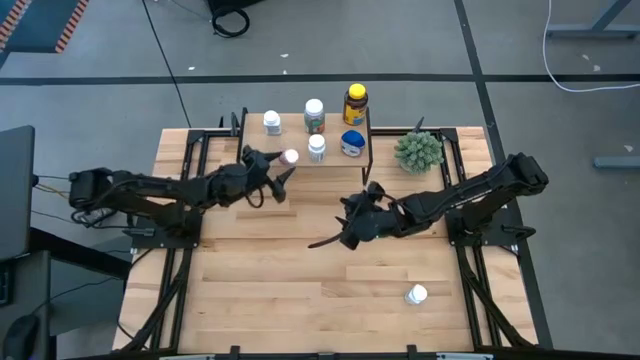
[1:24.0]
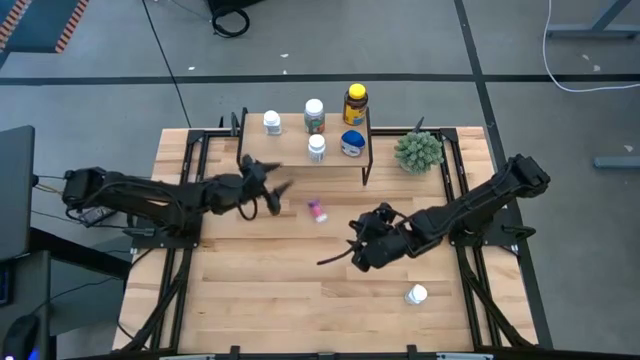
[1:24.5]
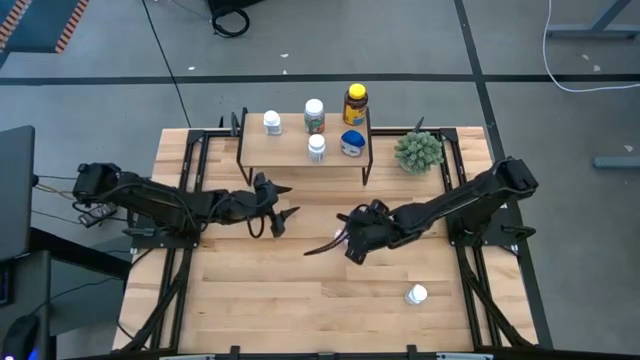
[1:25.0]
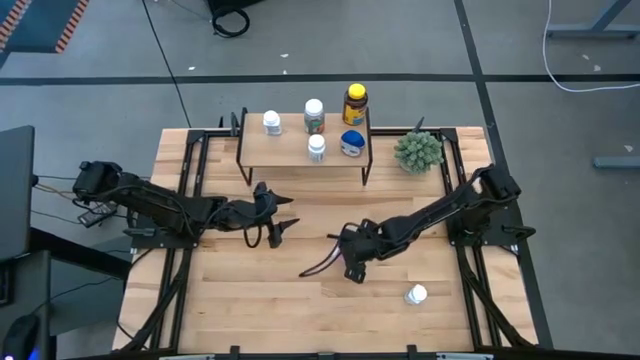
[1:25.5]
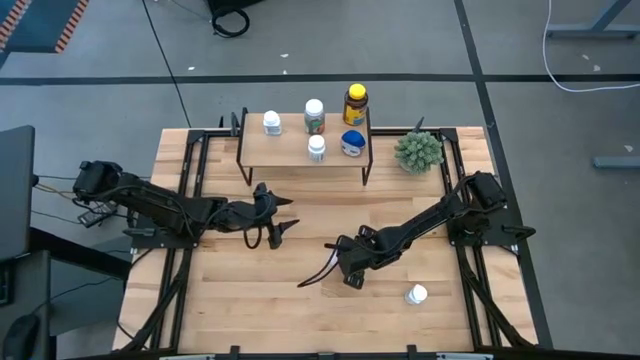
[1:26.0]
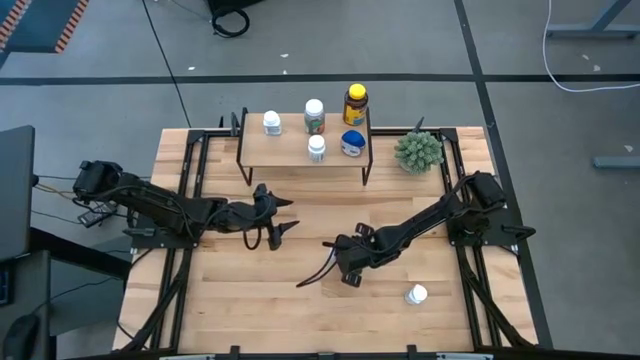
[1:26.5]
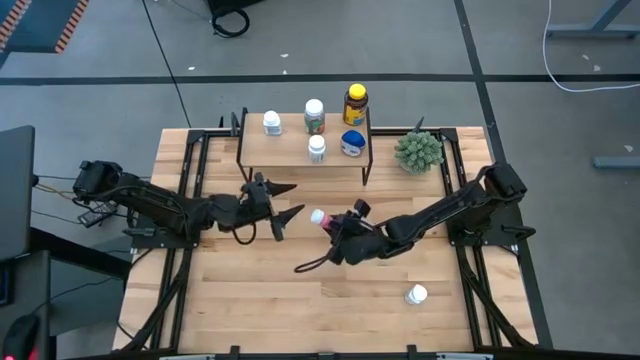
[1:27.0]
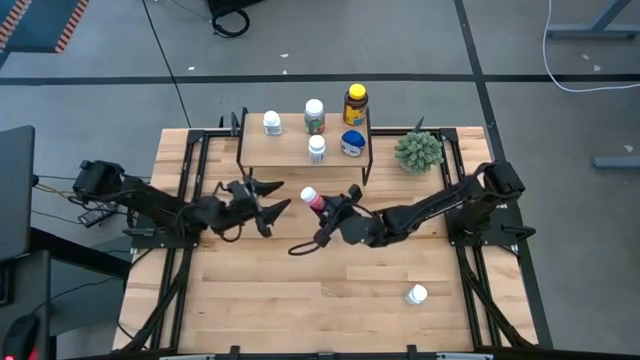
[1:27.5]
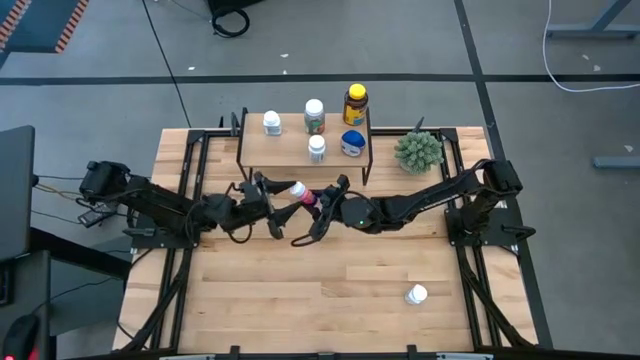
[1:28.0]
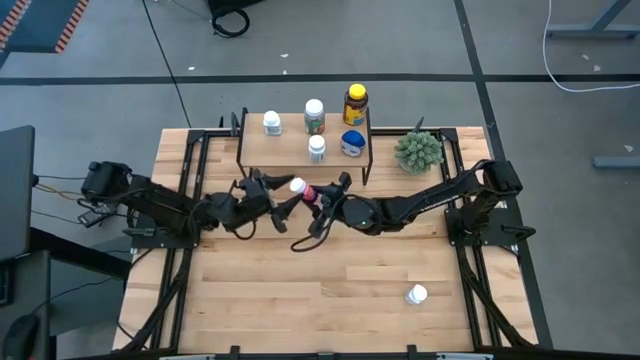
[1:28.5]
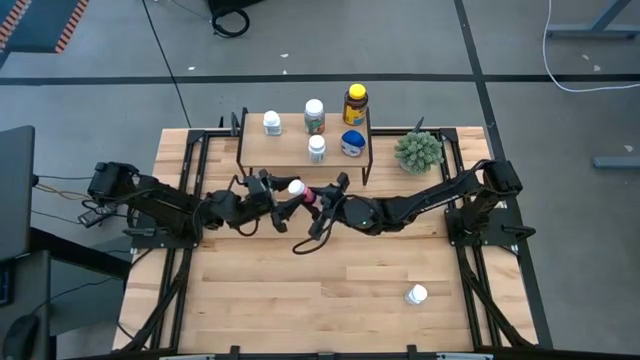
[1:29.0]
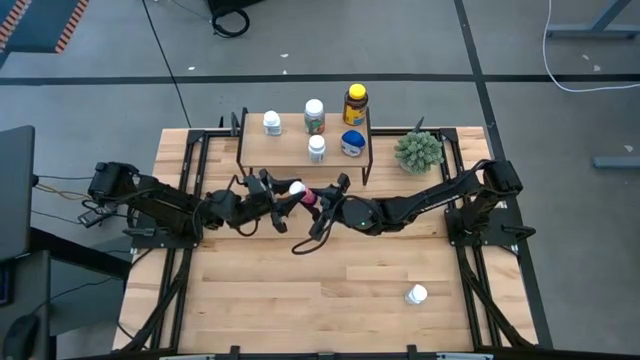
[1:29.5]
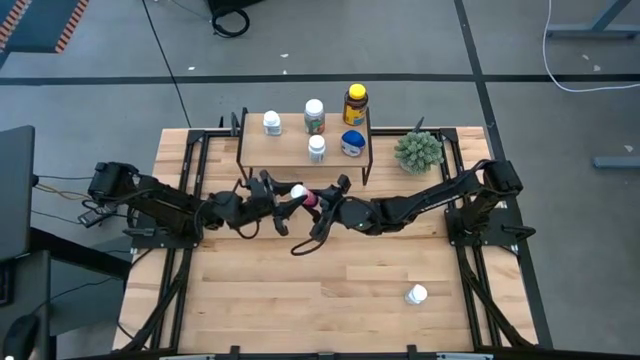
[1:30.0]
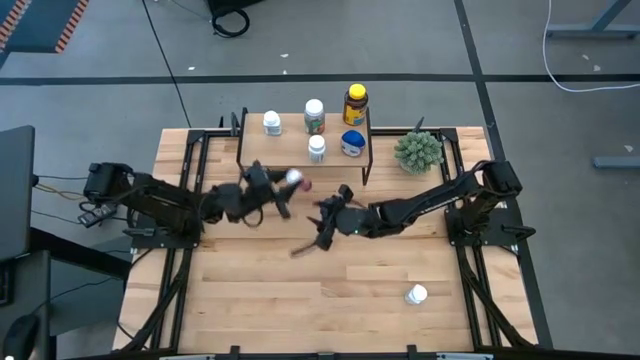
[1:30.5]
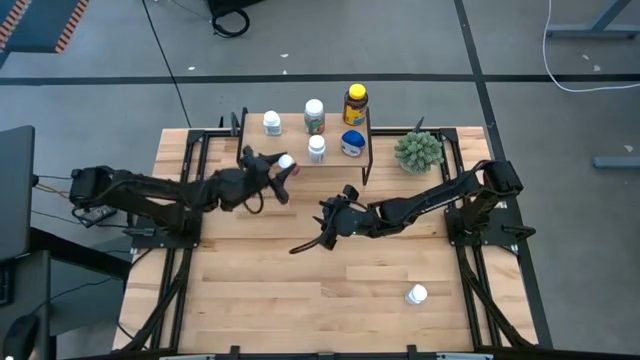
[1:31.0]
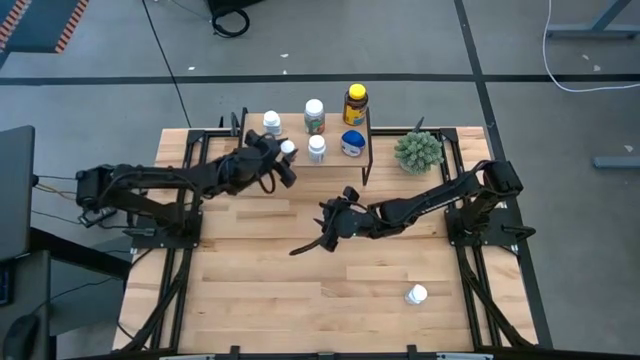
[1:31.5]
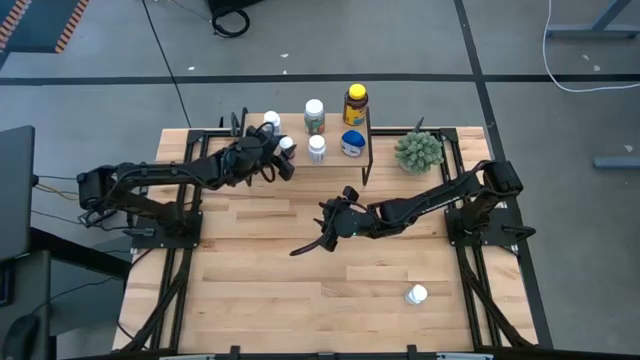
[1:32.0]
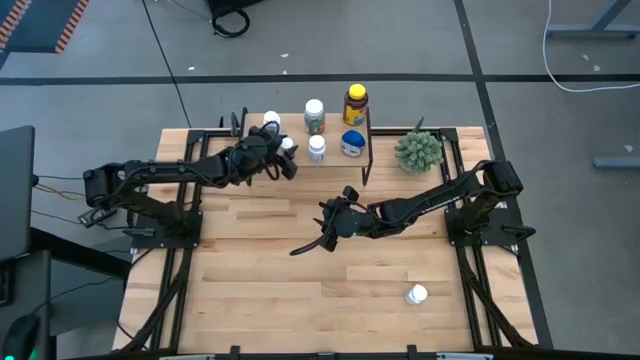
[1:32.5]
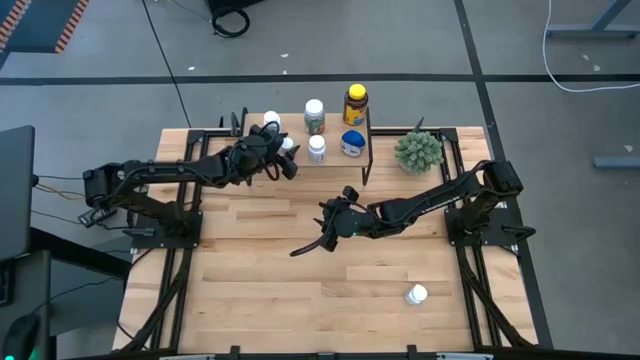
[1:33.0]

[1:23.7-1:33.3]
Task: Pick and place medicine bottles onto shelf by color
Put the pink pill bottle on the shelf

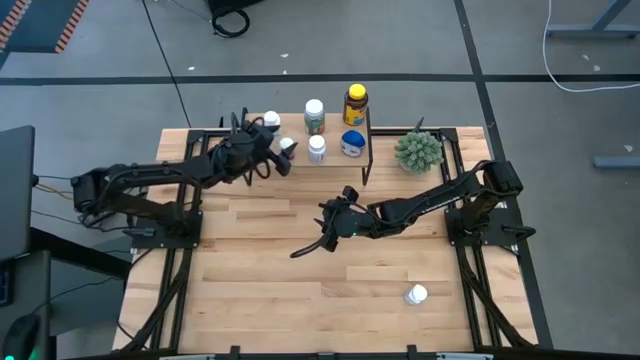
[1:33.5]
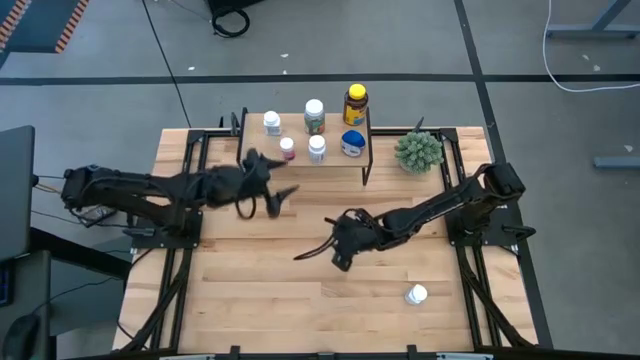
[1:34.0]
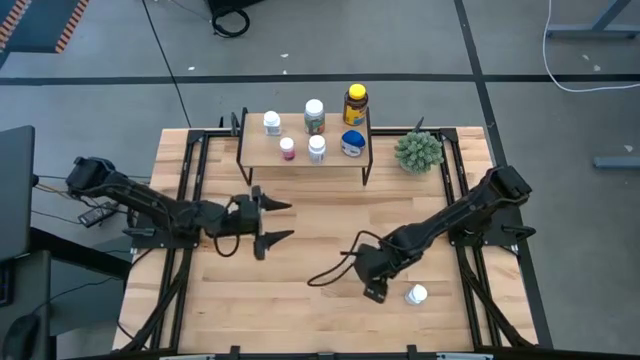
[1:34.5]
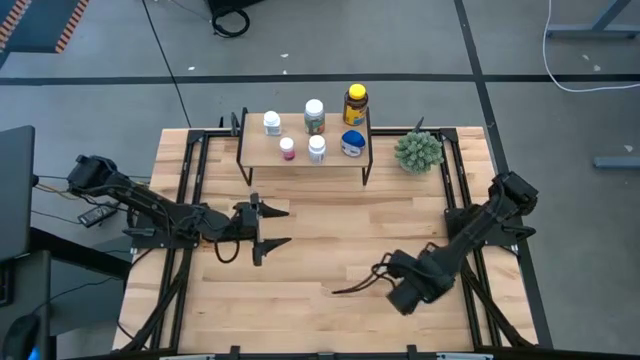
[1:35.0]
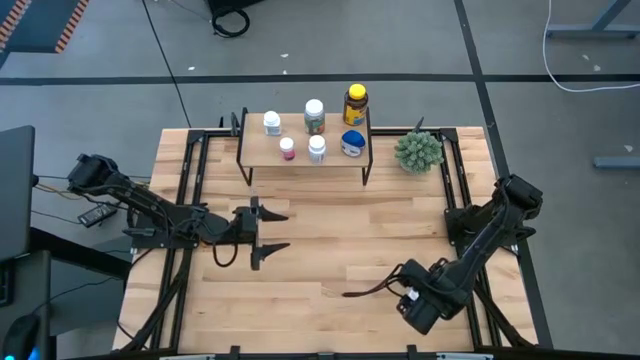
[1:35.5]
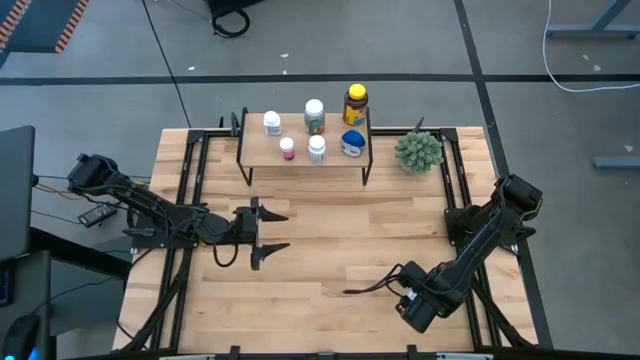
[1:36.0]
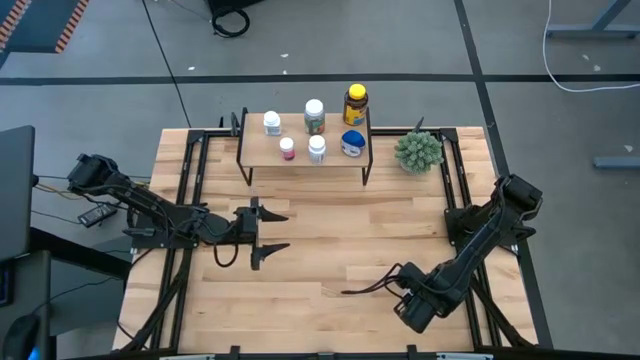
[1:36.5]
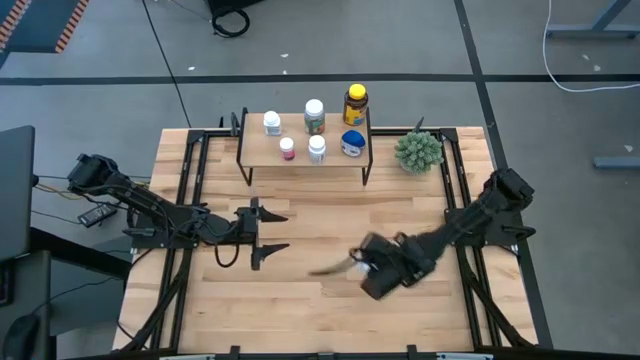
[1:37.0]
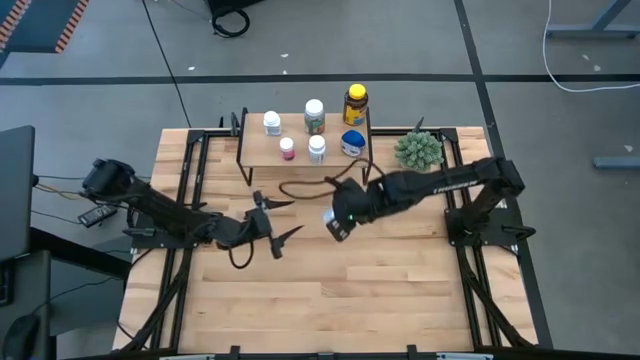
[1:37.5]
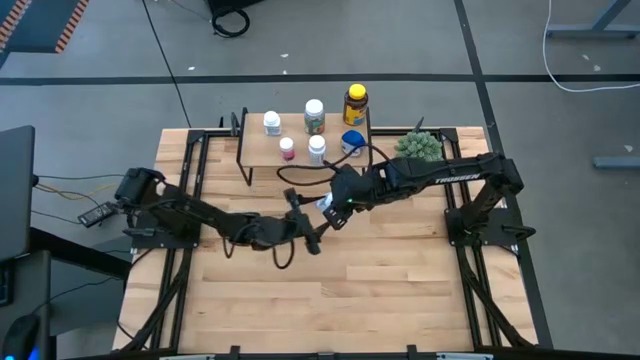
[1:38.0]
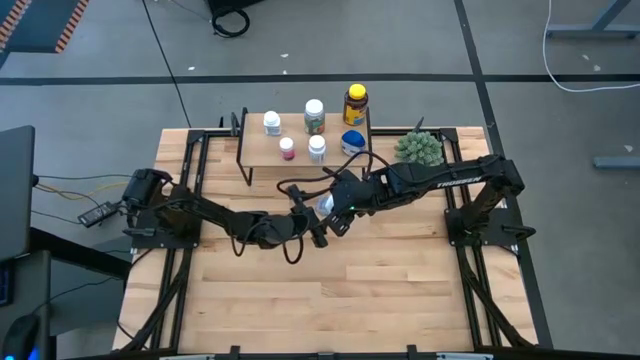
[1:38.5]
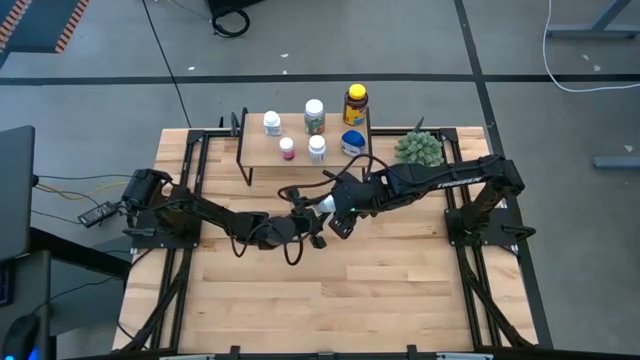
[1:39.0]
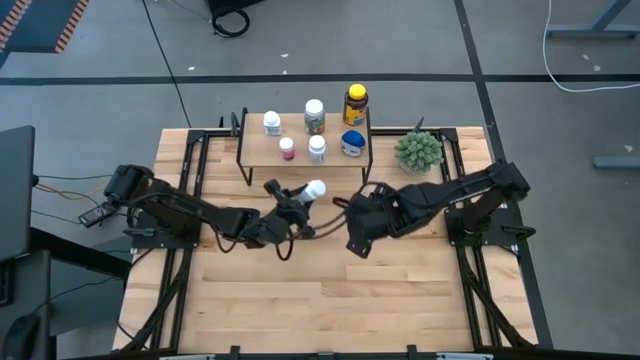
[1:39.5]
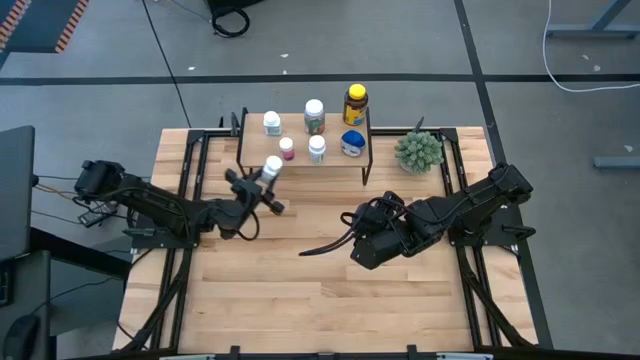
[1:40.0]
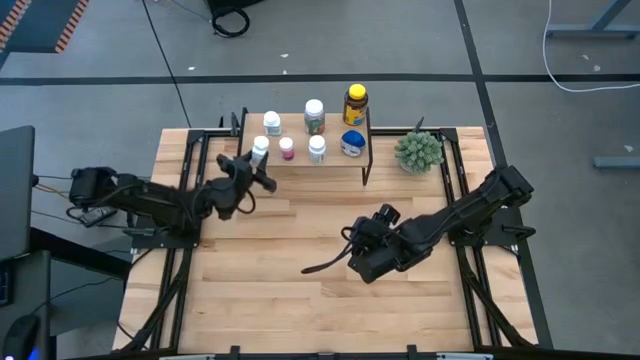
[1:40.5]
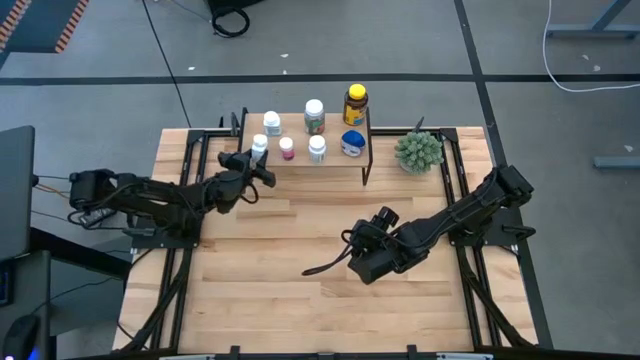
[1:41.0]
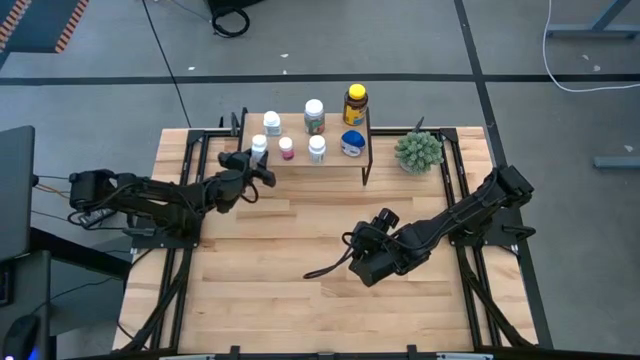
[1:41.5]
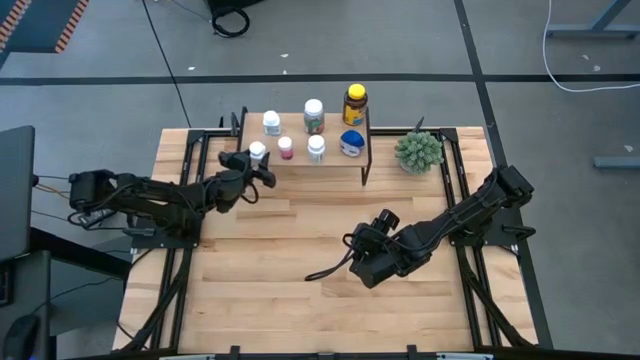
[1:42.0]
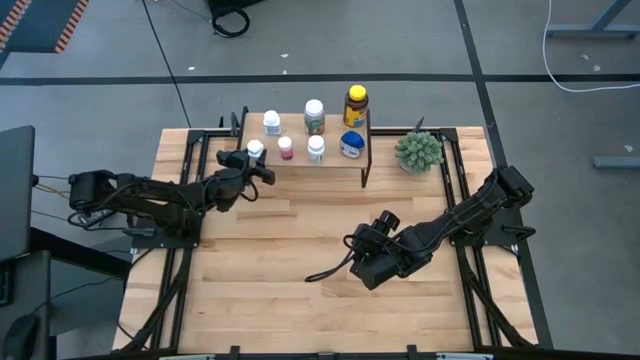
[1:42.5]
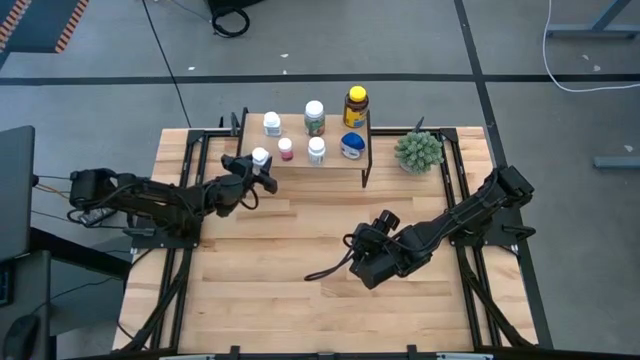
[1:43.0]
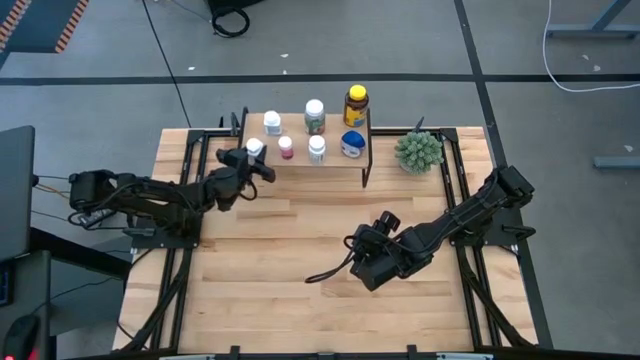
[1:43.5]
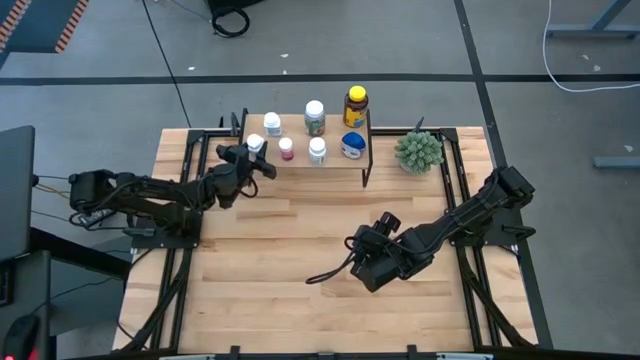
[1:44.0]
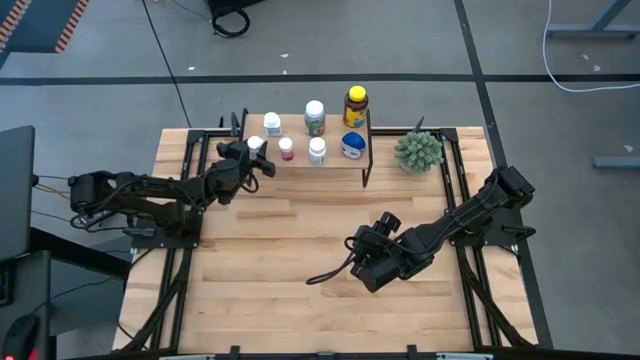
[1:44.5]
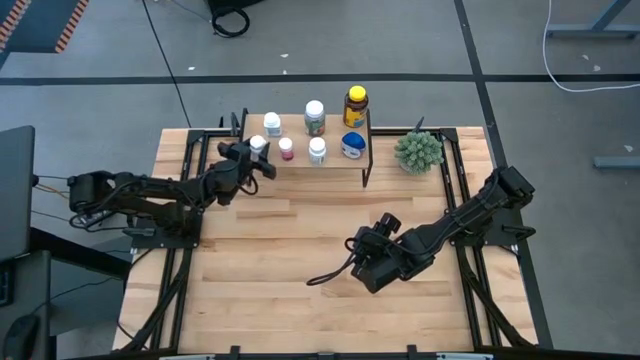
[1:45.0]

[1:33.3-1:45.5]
Put the white pill bottle on the shelf

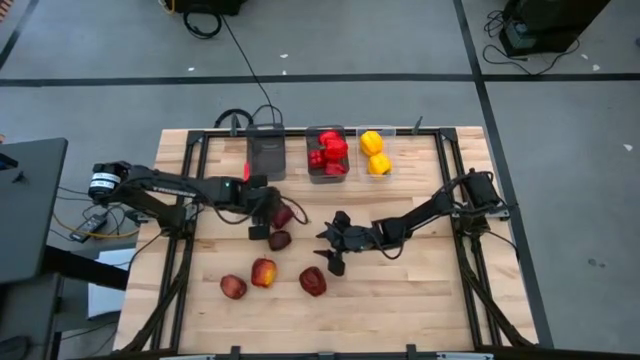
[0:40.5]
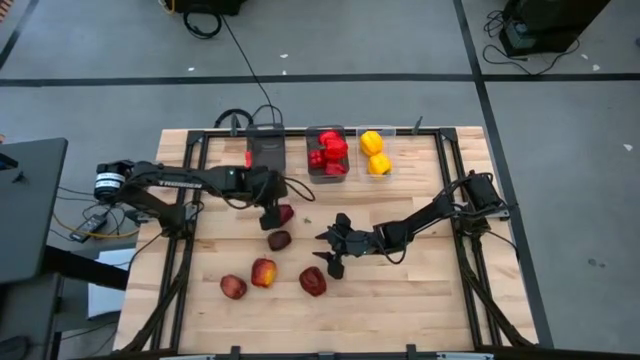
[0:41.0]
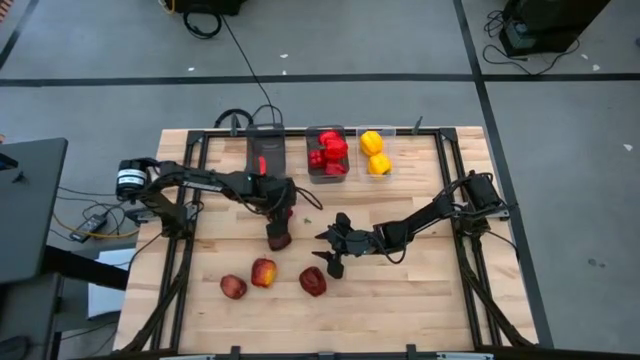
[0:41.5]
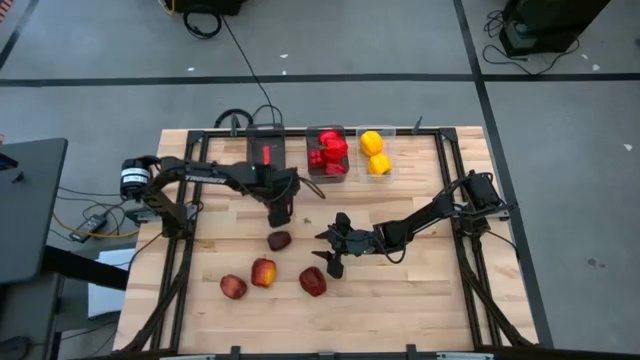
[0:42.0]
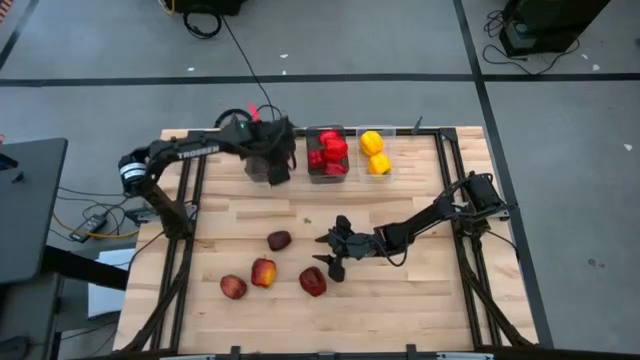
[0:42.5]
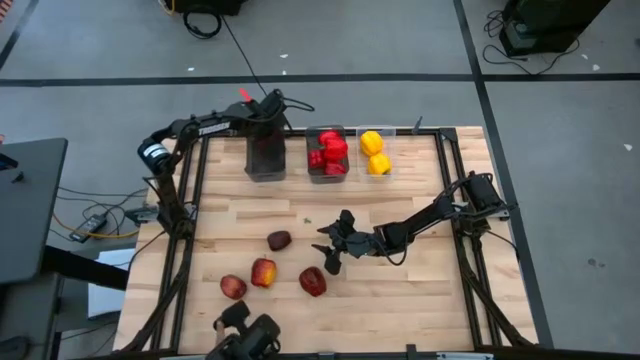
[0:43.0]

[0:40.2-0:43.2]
Task: Sort produce into baskets
Put the dark red apple into the left black bin
